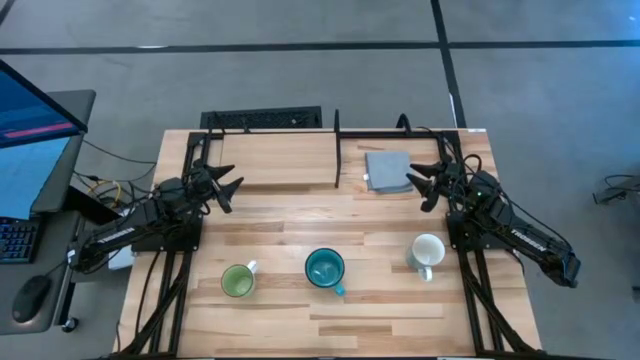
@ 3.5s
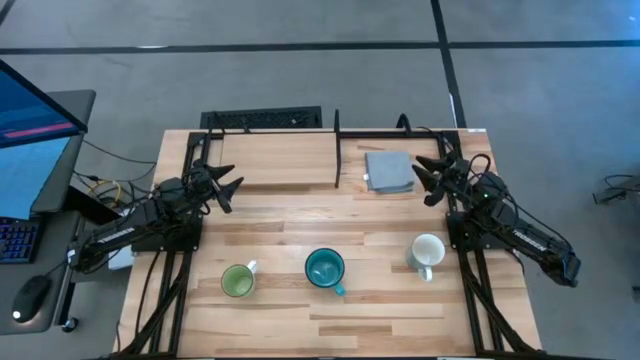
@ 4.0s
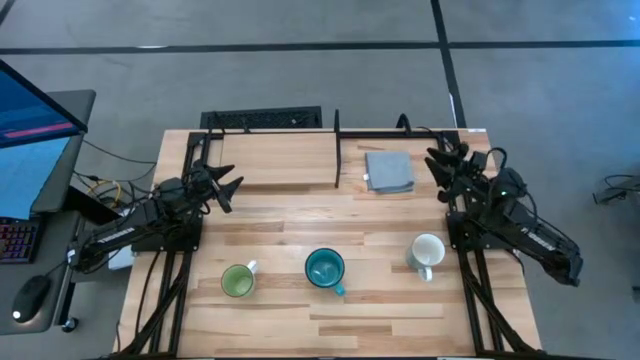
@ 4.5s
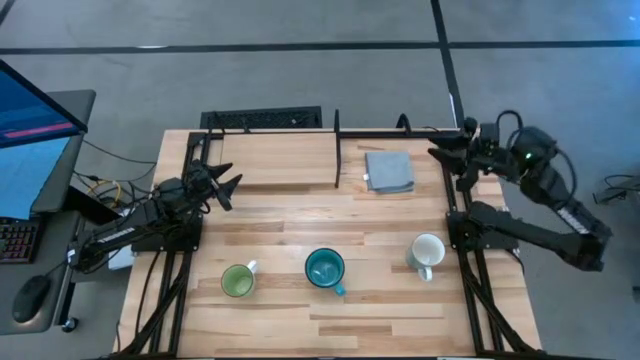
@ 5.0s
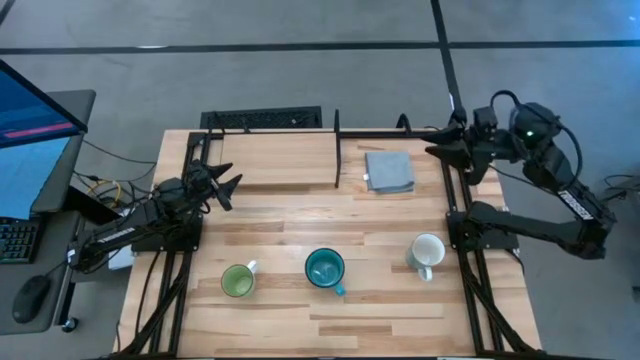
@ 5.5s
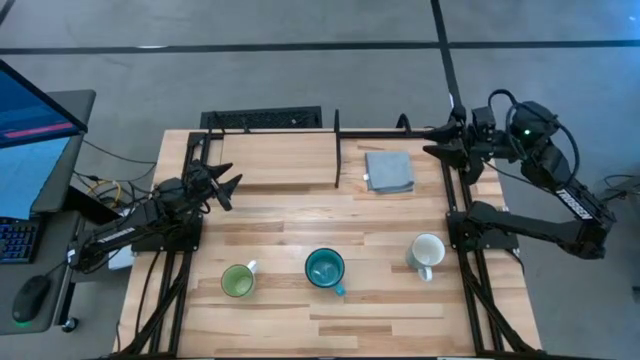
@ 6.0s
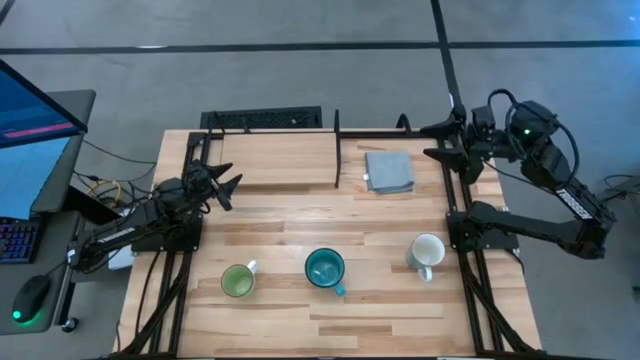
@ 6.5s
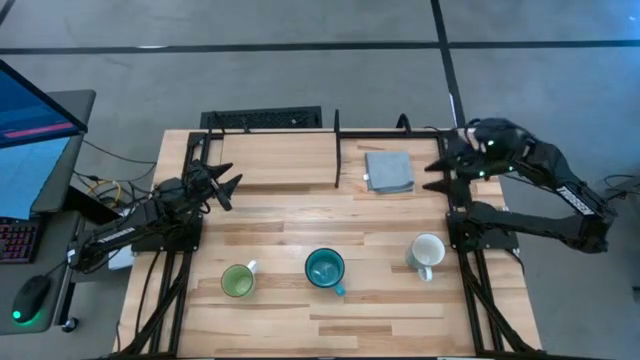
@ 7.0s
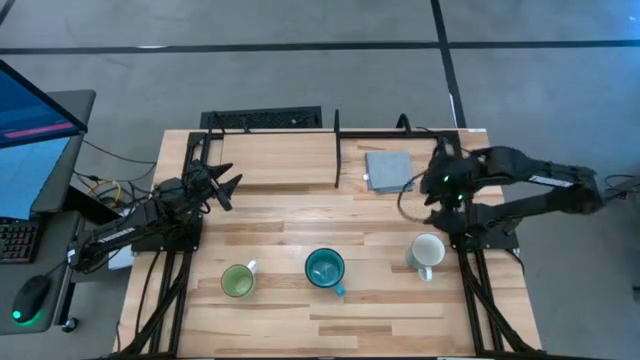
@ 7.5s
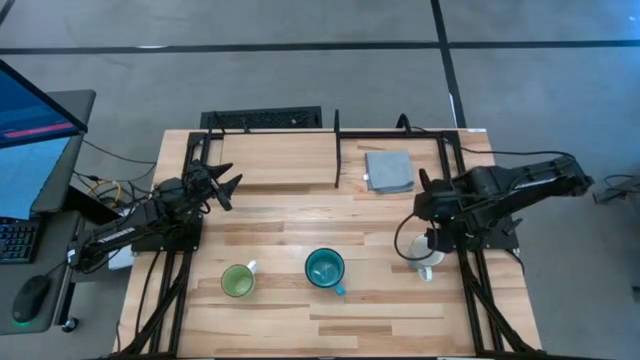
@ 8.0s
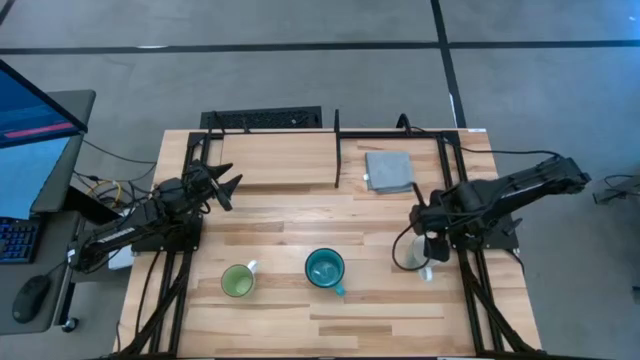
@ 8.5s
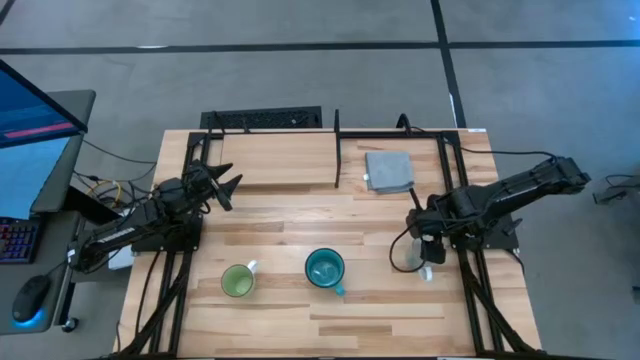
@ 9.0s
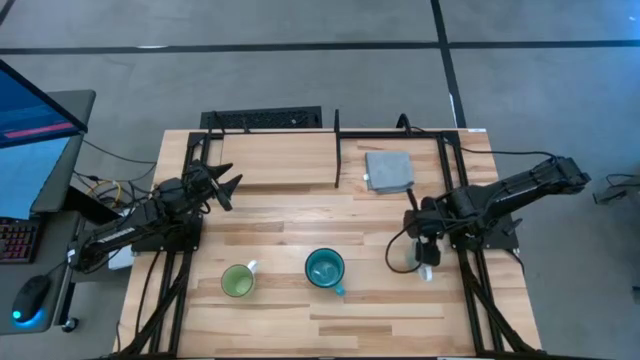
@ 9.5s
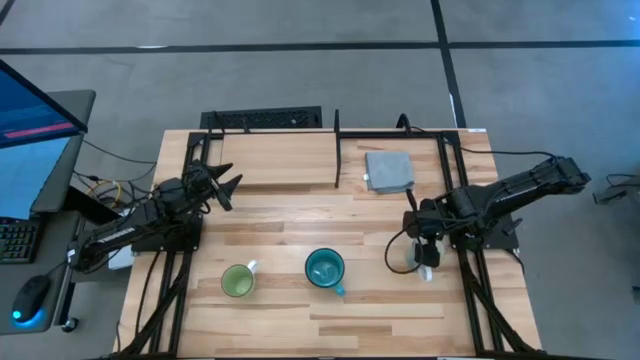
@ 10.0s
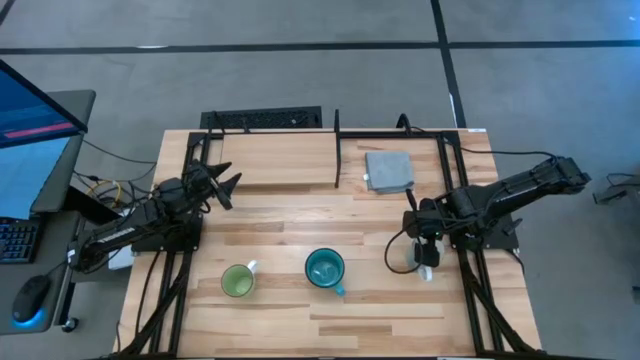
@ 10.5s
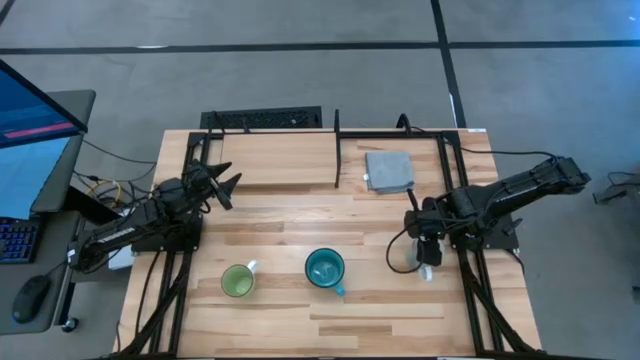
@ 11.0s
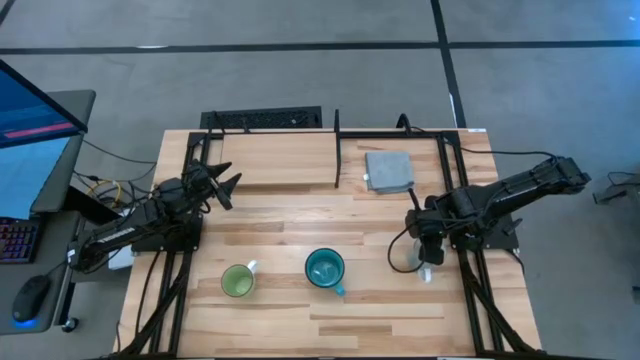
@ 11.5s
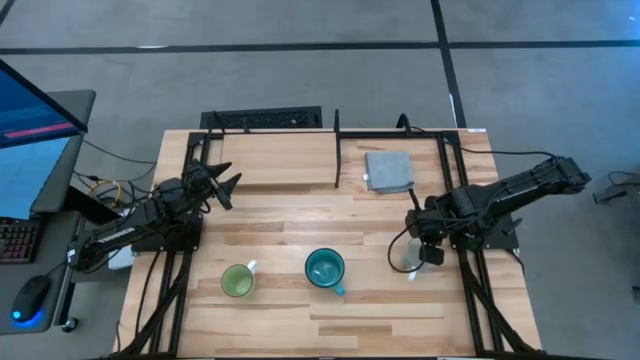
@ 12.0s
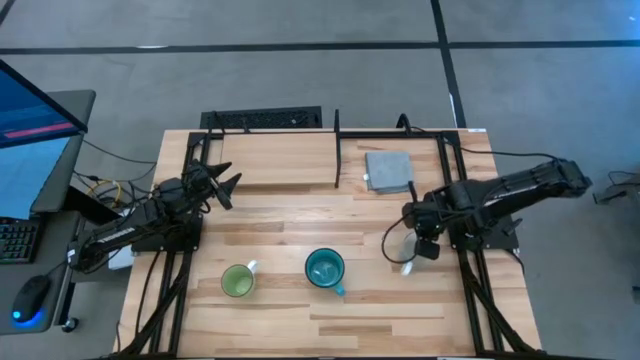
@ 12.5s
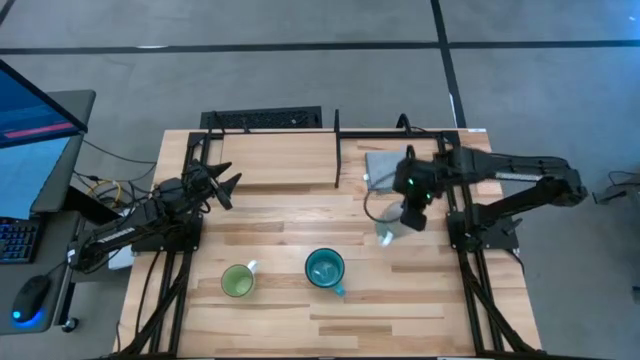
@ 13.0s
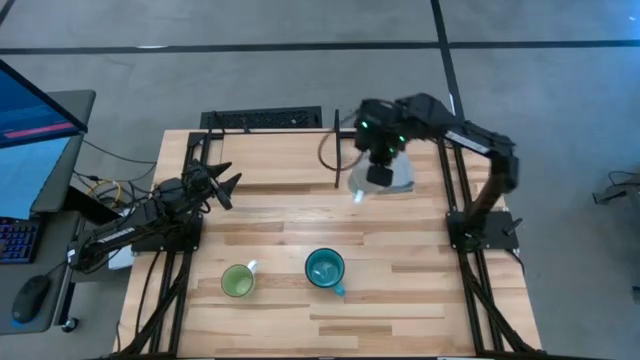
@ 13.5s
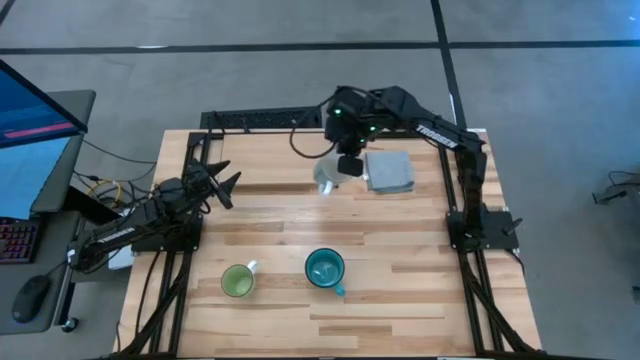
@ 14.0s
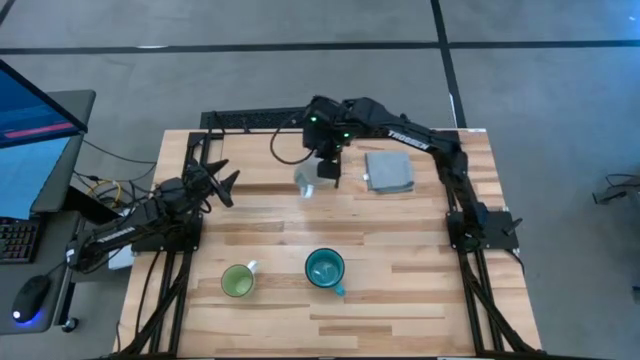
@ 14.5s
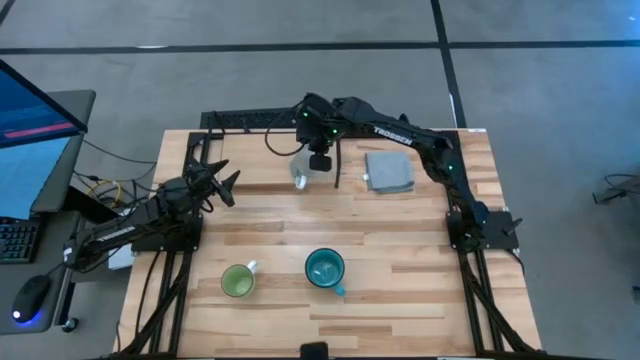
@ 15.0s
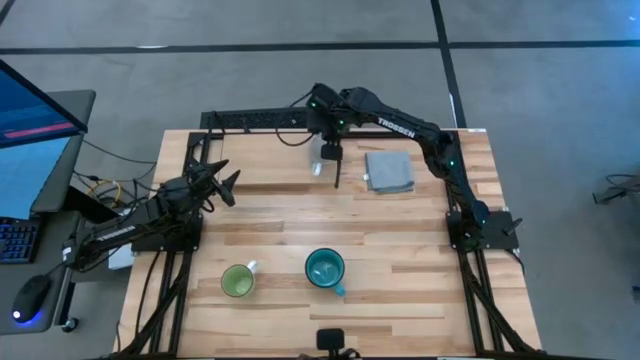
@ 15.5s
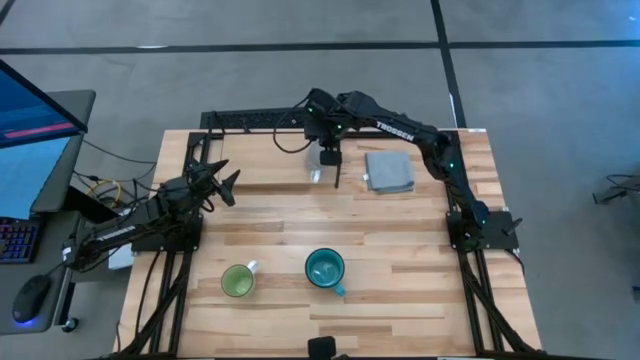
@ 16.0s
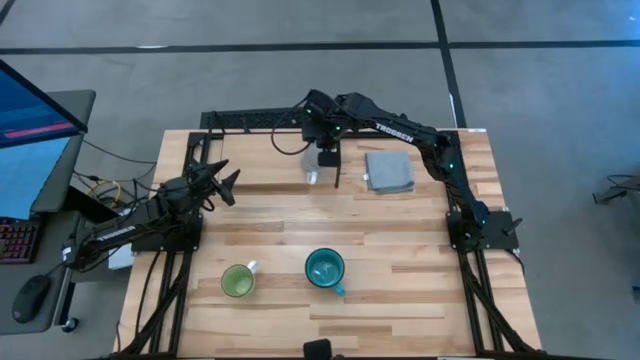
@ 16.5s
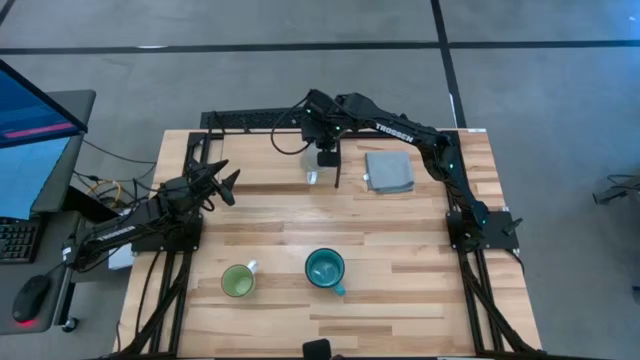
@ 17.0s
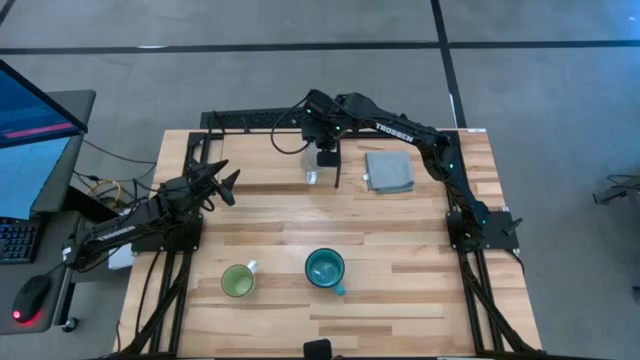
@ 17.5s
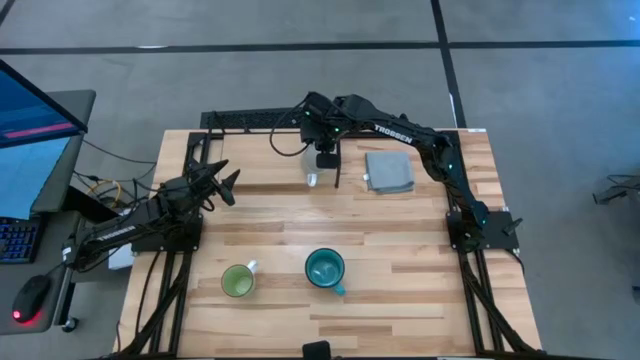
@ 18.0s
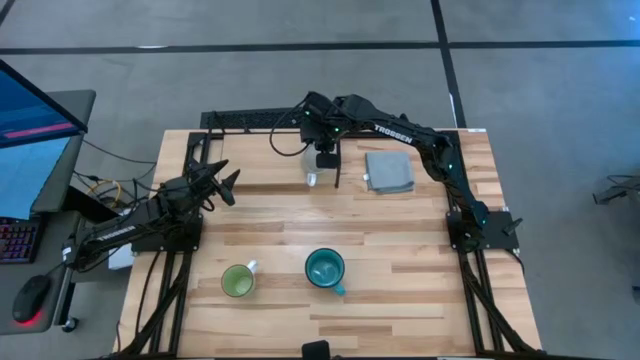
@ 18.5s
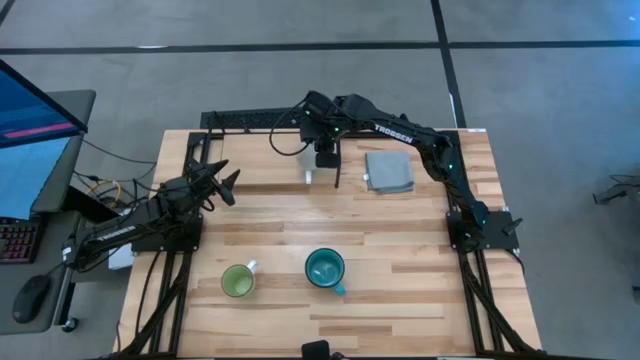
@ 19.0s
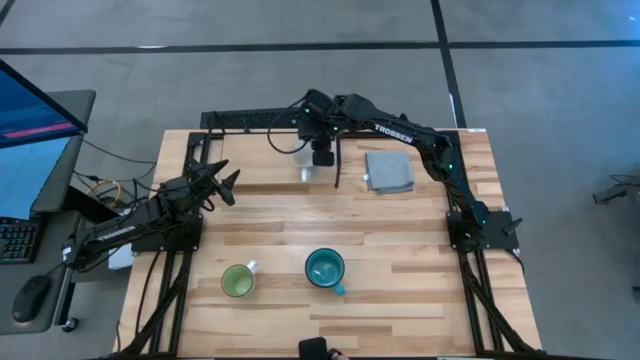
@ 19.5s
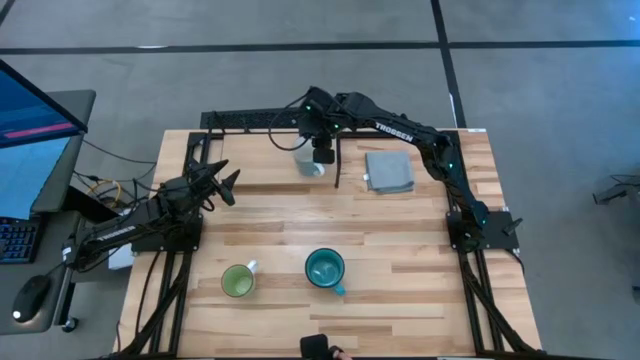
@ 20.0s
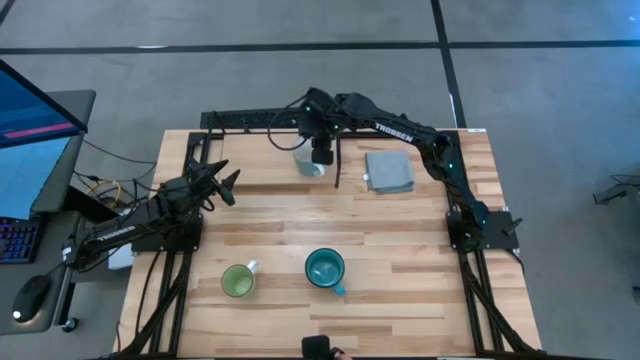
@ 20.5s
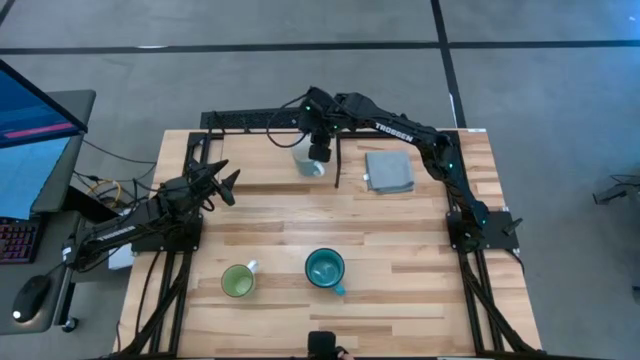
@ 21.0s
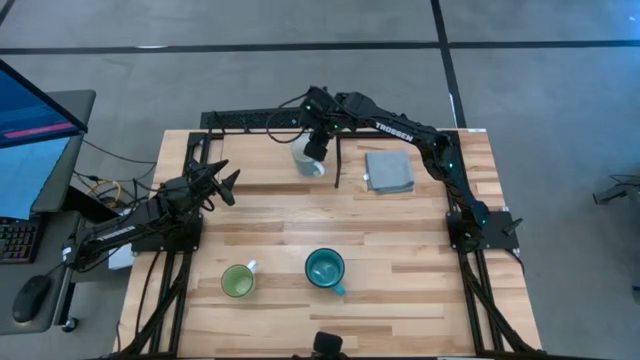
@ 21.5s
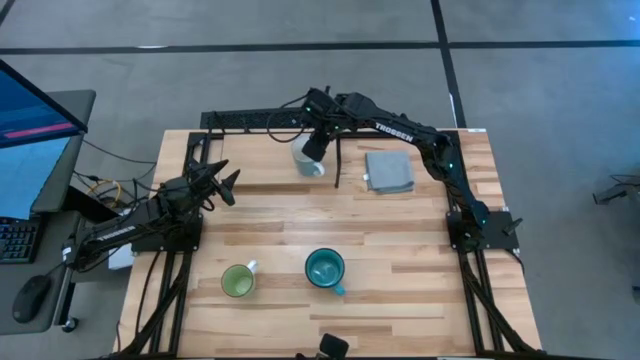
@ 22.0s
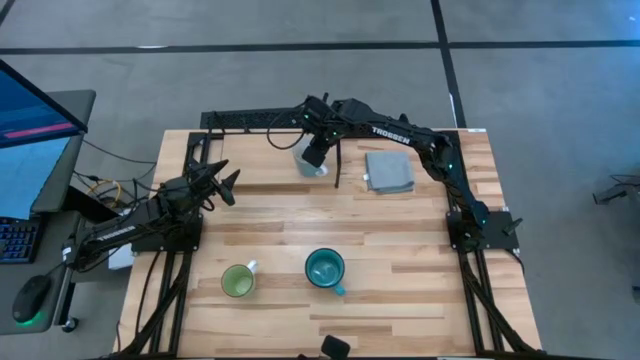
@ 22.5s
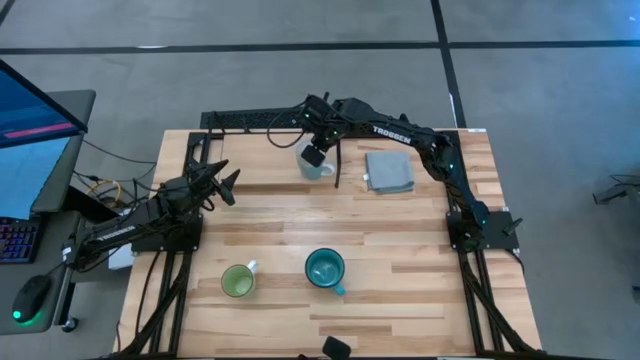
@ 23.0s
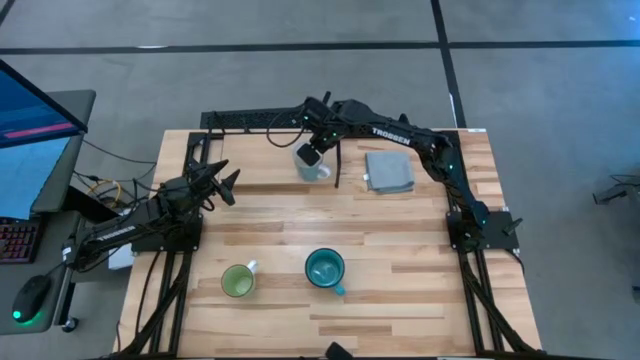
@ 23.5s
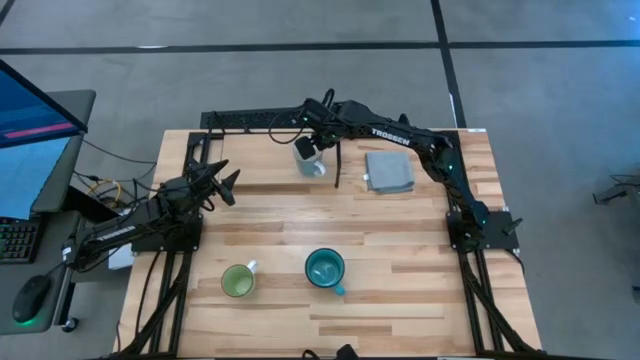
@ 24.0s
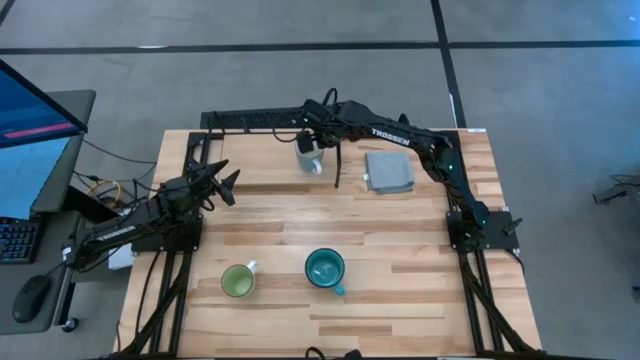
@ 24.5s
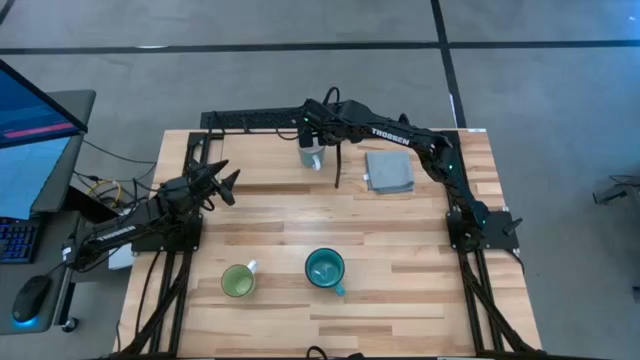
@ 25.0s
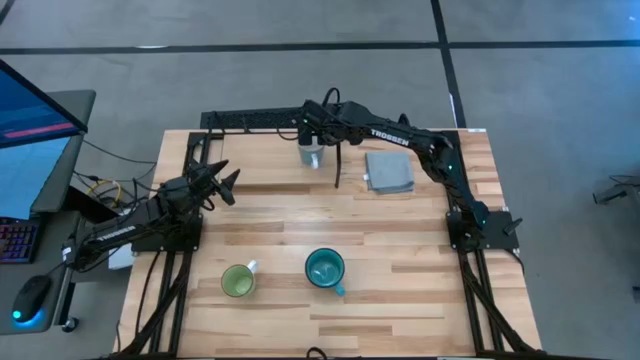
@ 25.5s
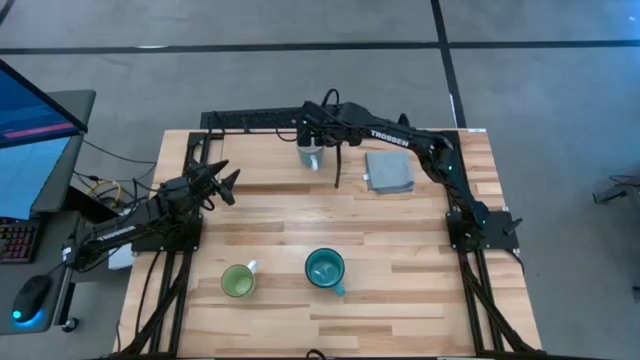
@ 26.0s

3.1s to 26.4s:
Task: Stack small to large cups/mugs on shelf
Put the white mug on the shelf
